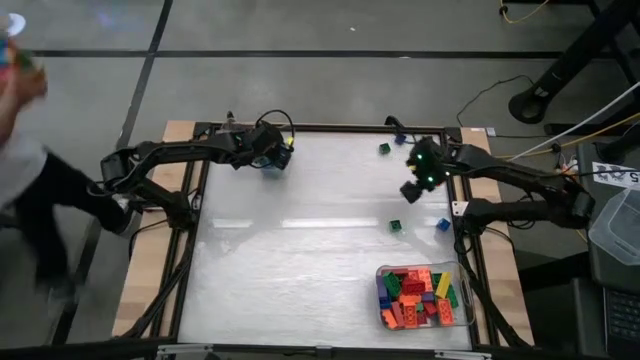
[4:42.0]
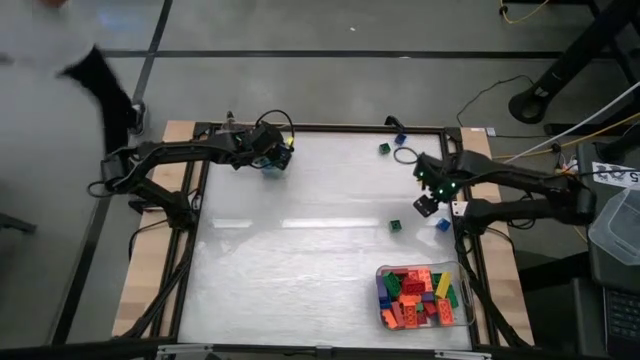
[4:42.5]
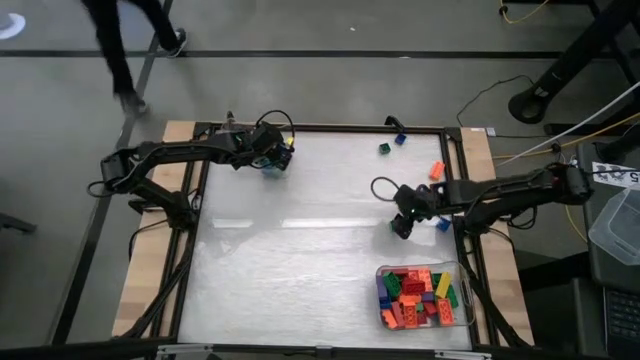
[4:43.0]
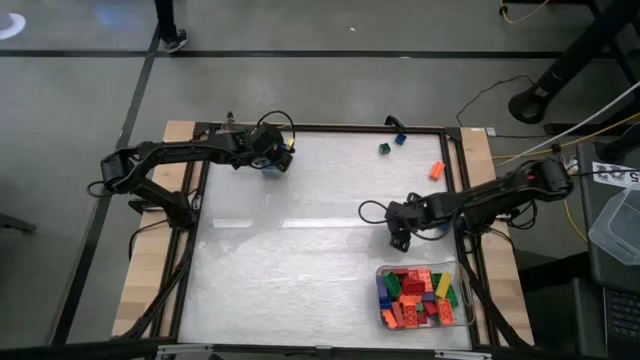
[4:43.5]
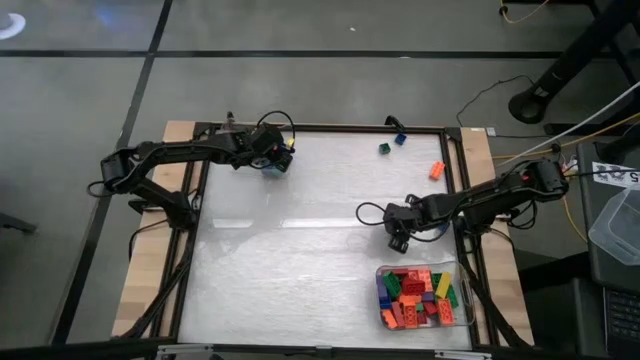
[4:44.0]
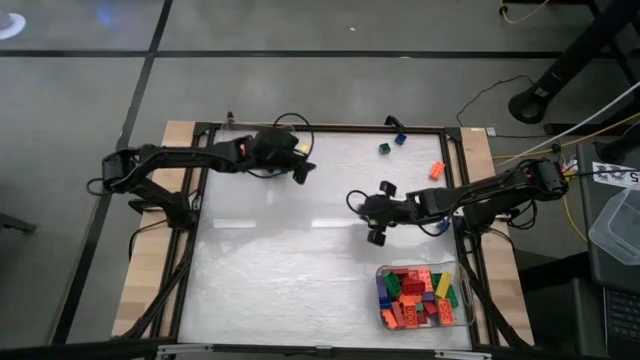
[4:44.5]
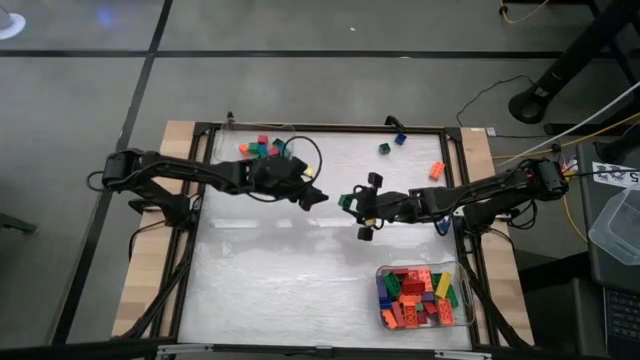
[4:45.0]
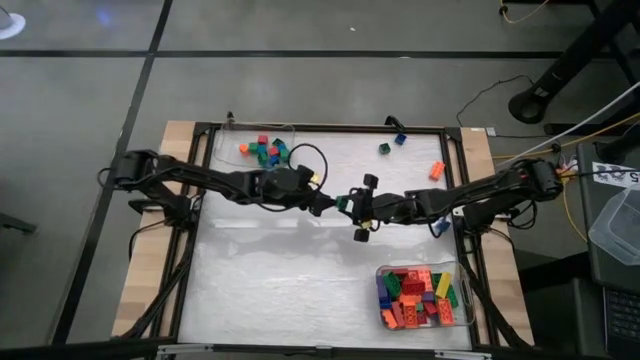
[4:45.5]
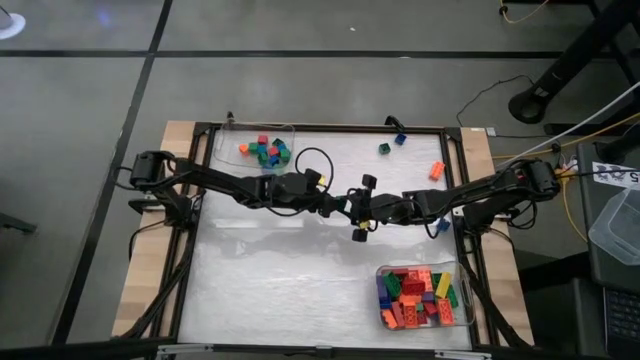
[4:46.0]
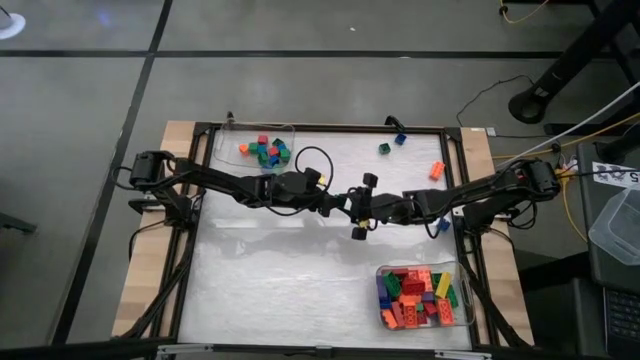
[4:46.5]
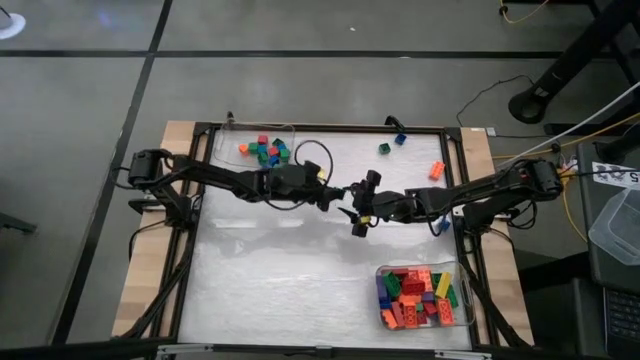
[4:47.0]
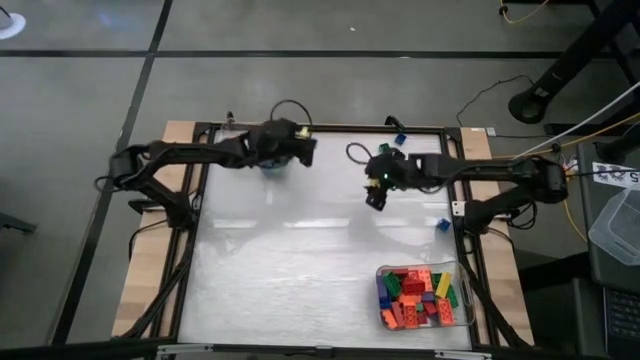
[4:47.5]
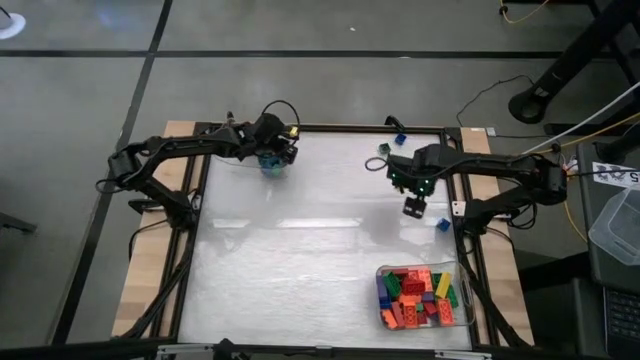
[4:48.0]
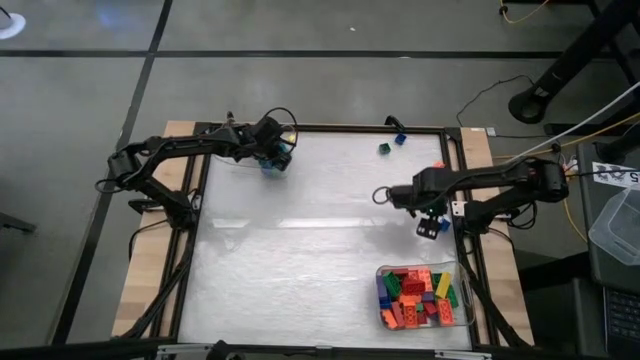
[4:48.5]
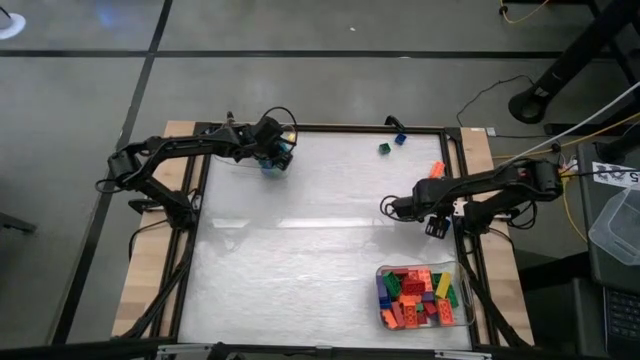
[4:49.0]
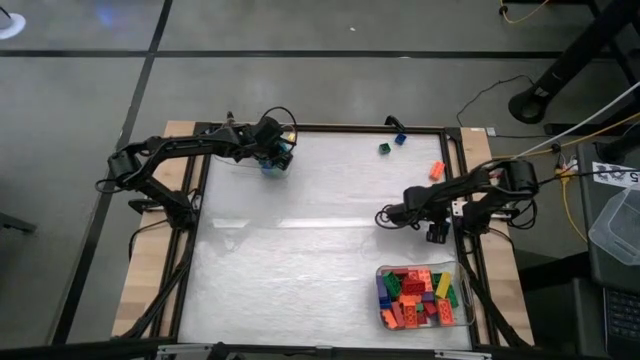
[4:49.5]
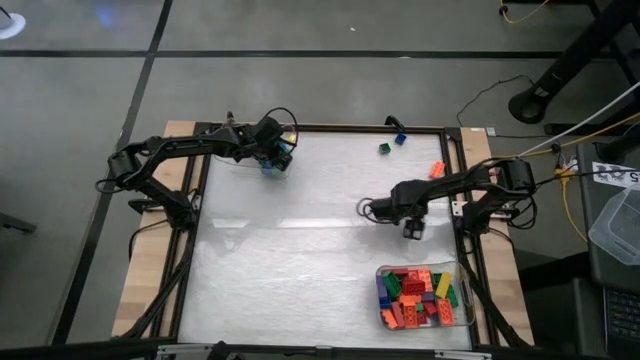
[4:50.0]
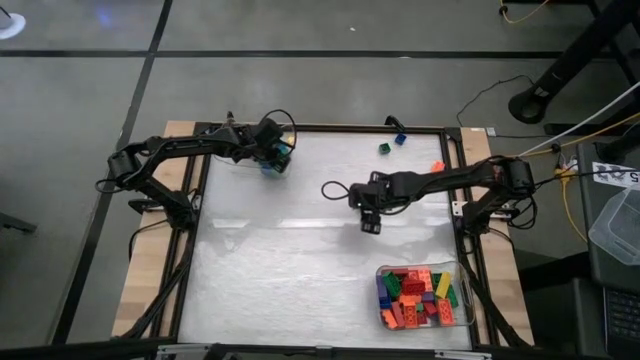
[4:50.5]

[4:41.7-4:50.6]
Task: Sort blocks by size
Put the square green game piece into the top transparent bin

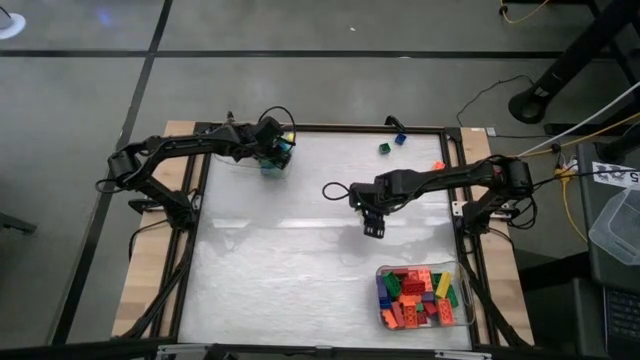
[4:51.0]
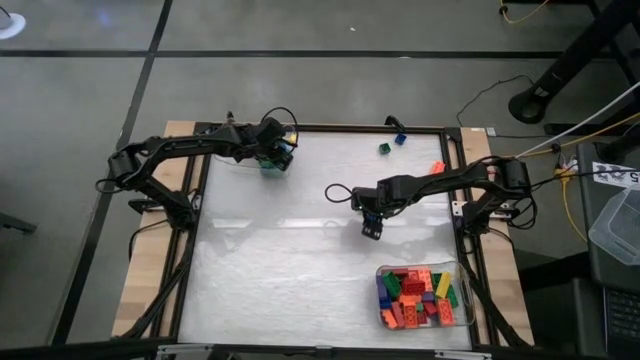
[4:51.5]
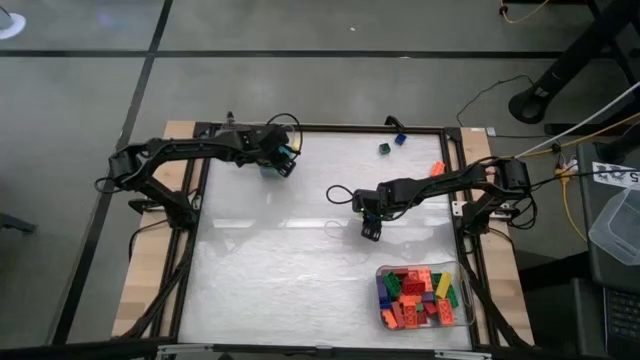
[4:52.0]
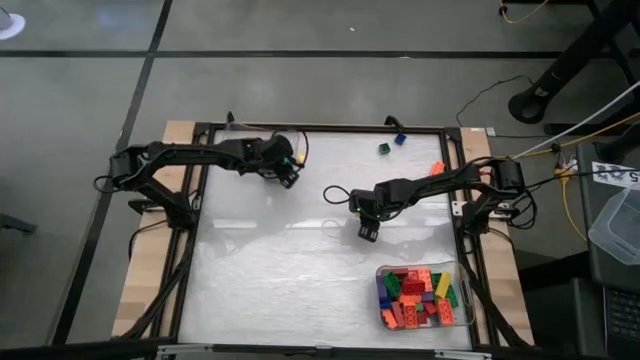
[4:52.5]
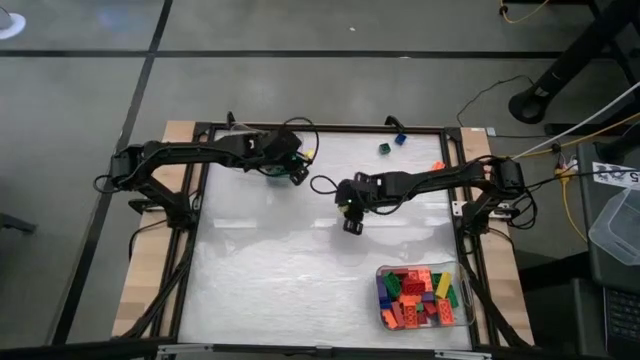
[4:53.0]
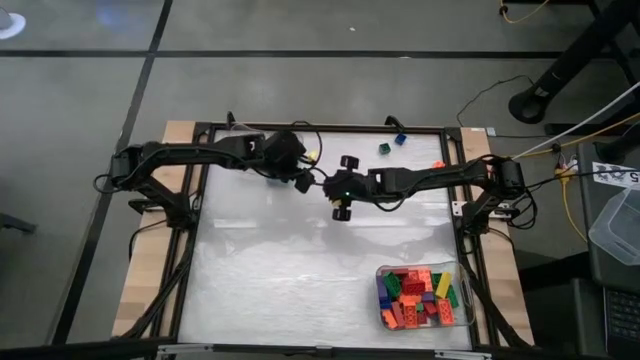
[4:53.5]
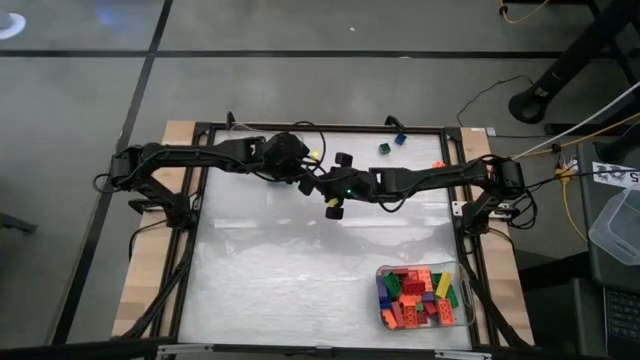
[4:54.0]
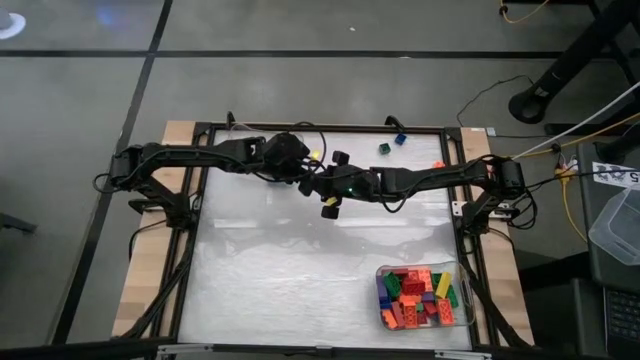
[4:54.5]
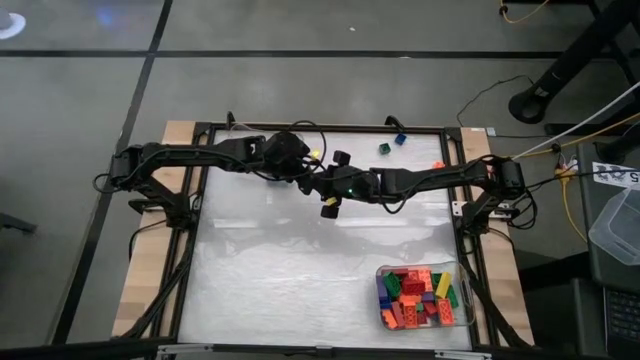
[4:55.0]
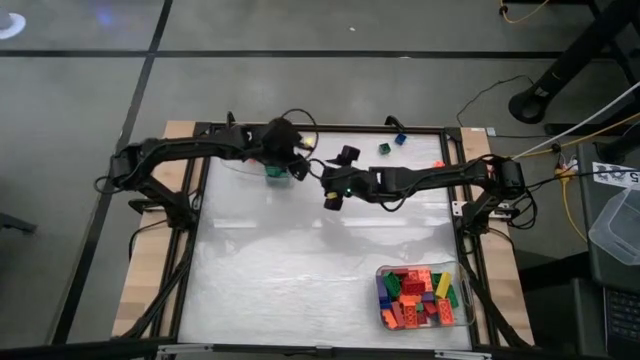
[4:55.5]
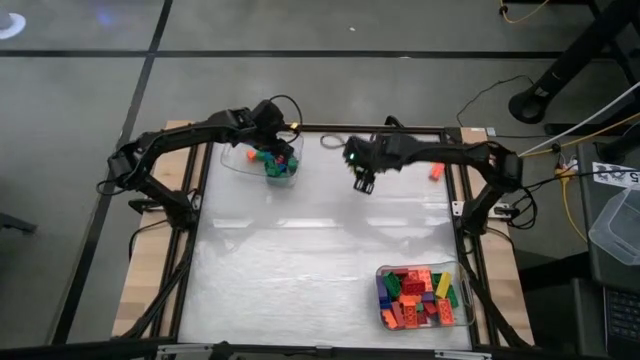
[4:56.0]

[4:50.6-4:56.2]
Put the square blue game piece into the top transparent bin

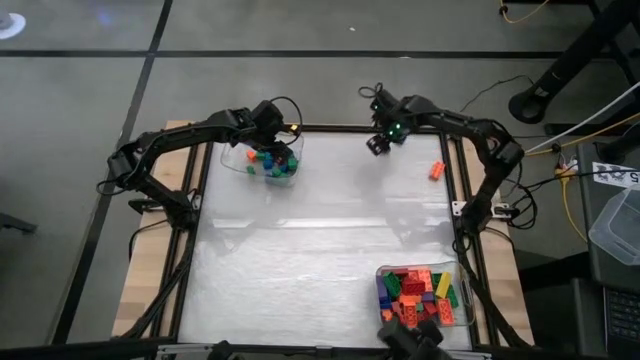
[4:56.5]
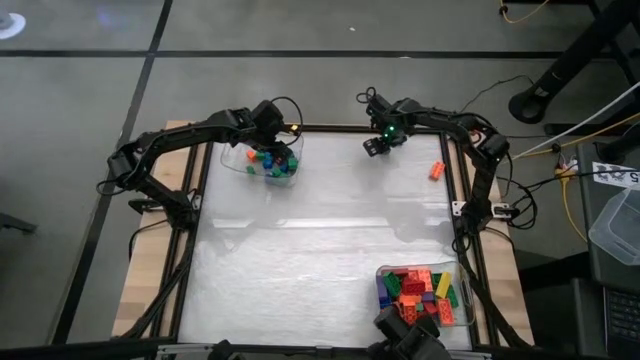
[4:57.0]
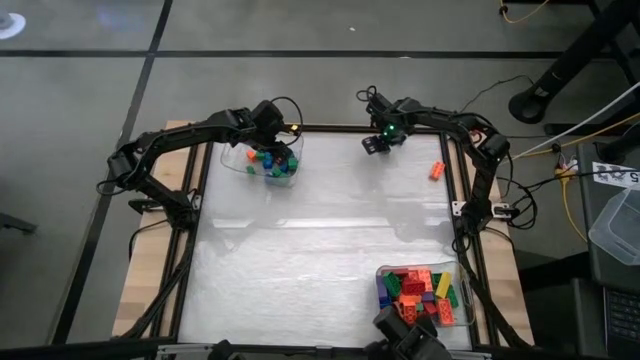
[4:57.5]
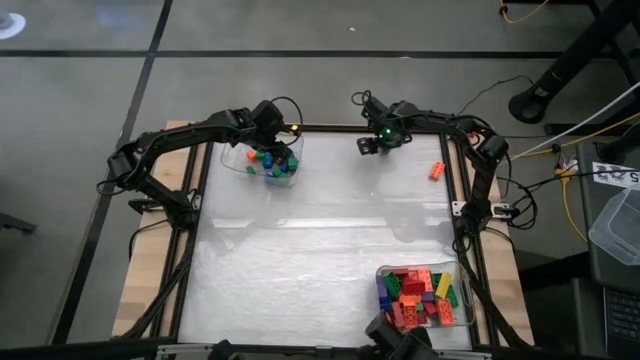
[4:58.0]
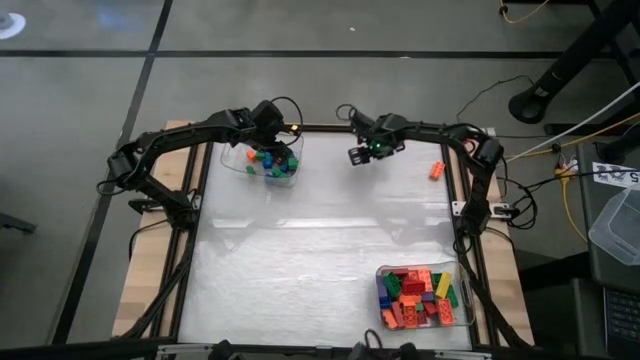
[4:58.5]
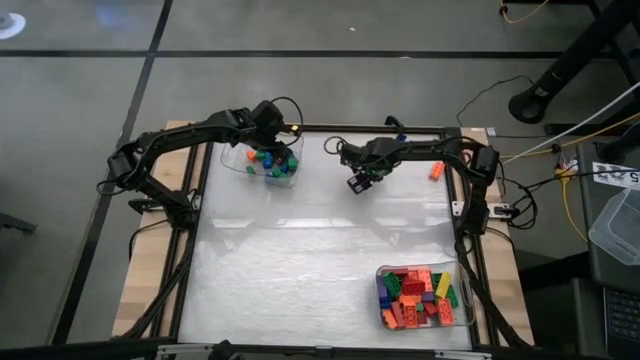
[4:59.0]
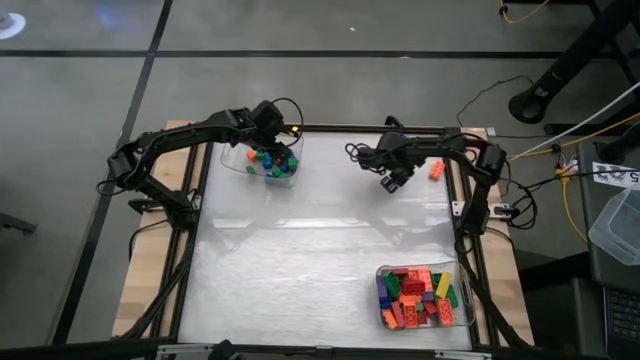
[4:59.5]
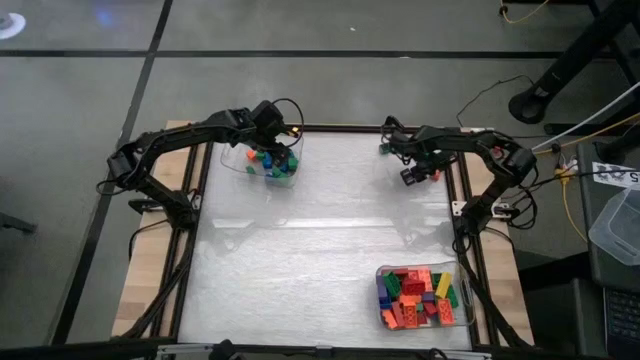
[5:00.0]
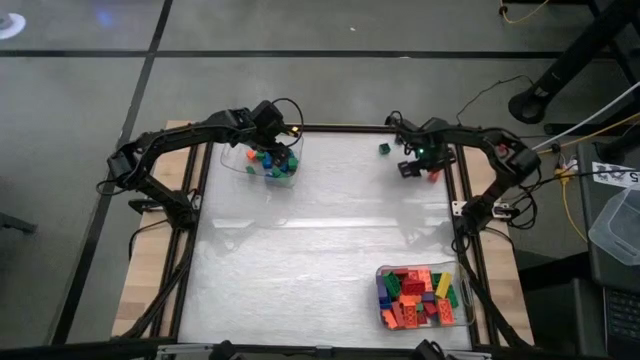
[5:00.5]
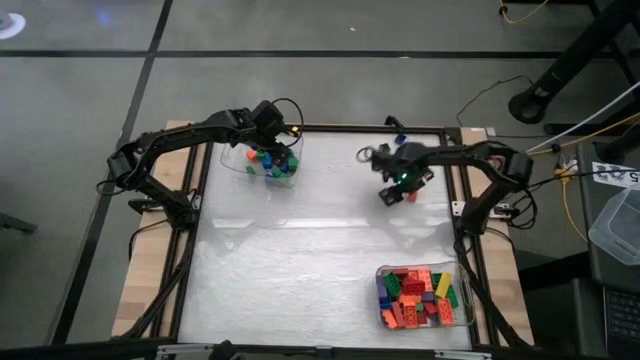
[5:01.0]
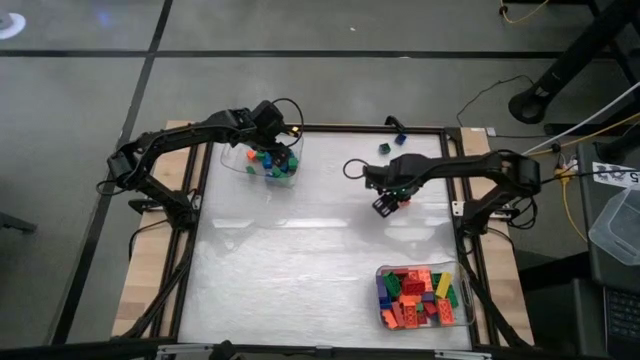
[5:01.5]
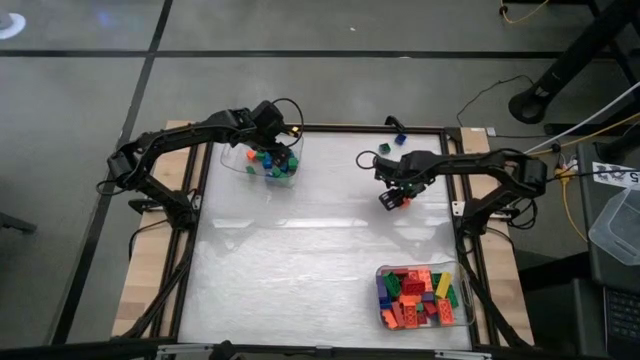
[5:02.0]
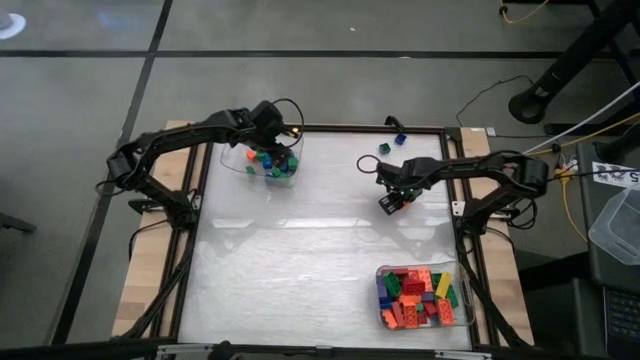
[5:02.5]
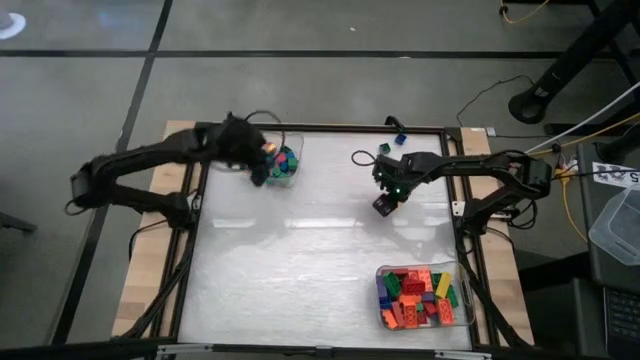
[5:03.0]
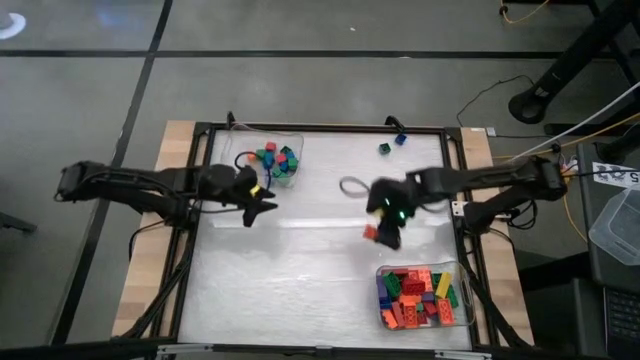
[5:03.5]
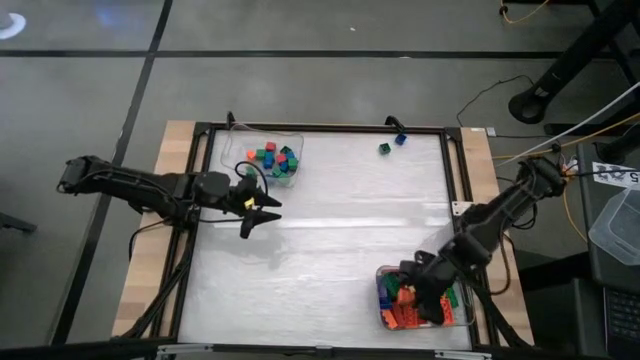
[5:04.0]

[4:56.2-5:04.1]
Put the rectangular orange game piece into the bottom transparent bin
